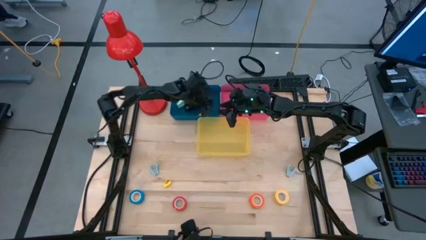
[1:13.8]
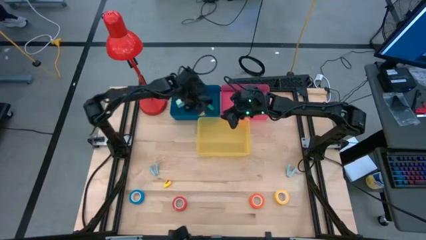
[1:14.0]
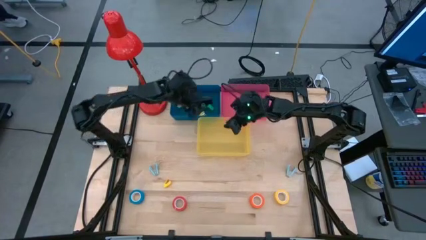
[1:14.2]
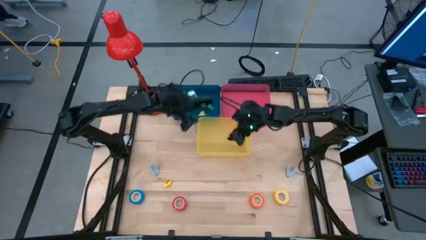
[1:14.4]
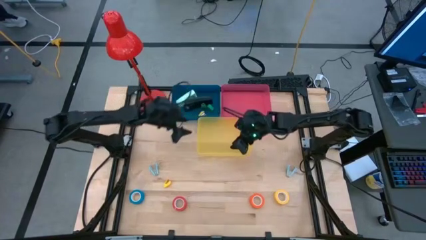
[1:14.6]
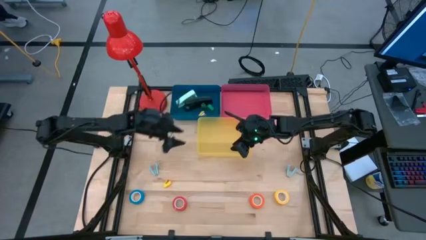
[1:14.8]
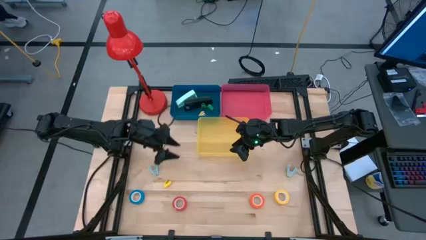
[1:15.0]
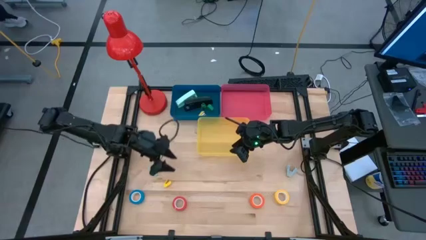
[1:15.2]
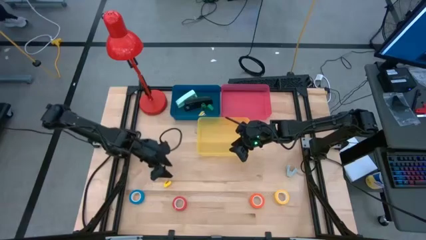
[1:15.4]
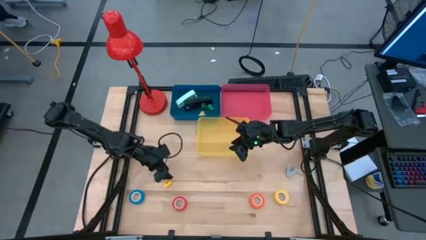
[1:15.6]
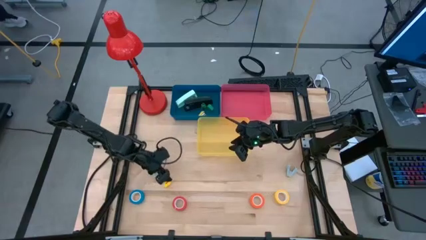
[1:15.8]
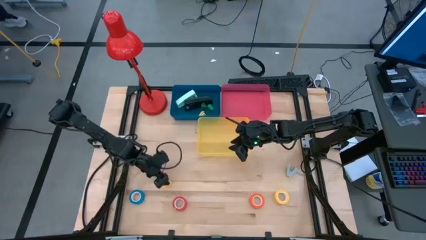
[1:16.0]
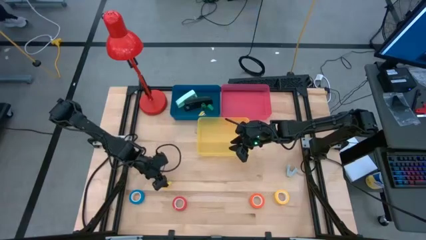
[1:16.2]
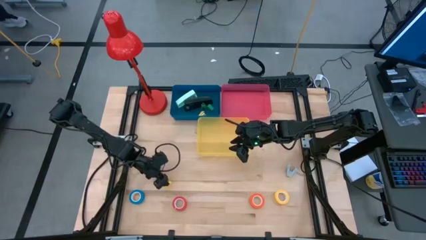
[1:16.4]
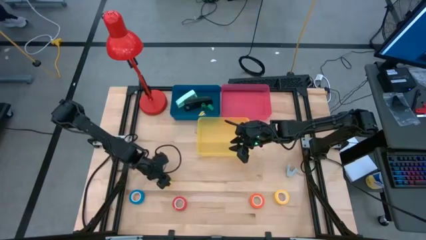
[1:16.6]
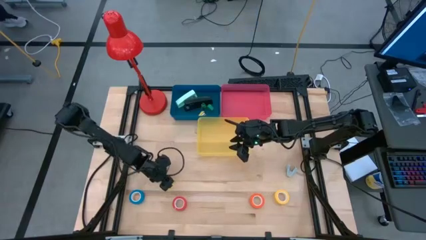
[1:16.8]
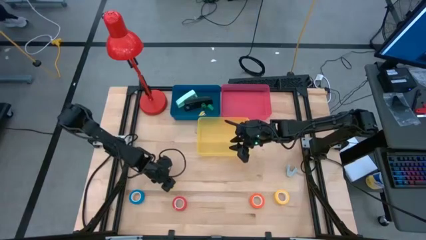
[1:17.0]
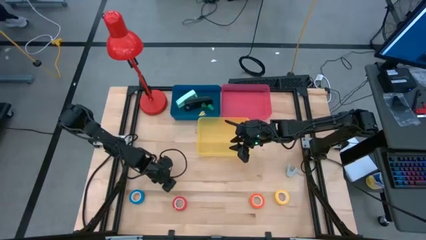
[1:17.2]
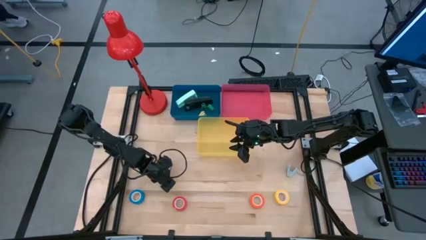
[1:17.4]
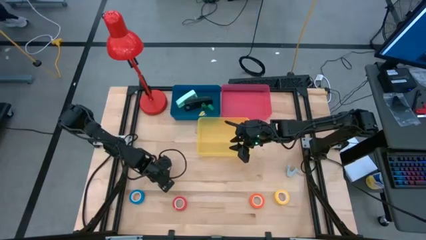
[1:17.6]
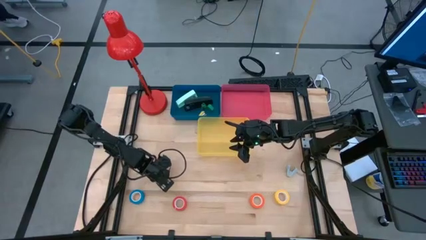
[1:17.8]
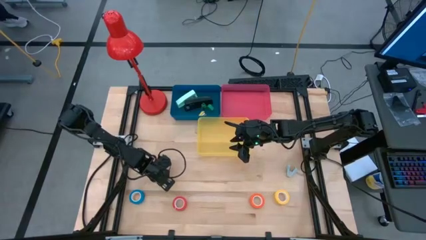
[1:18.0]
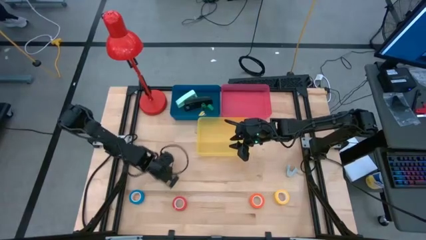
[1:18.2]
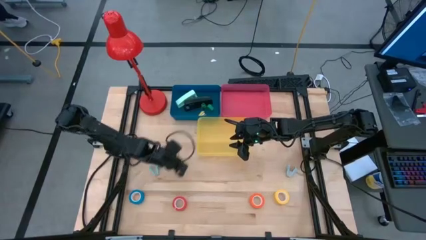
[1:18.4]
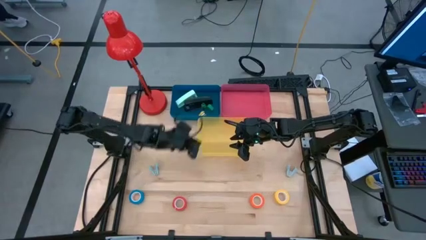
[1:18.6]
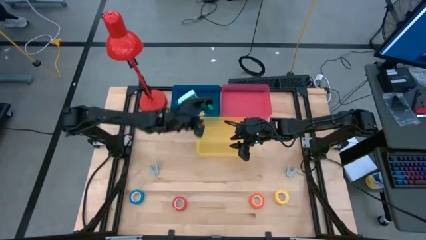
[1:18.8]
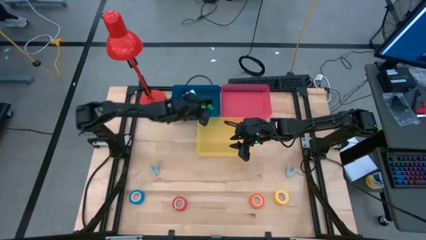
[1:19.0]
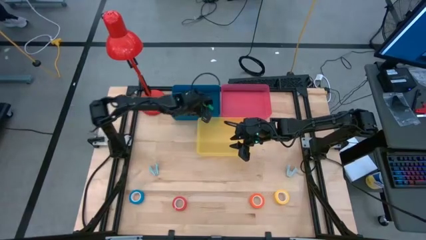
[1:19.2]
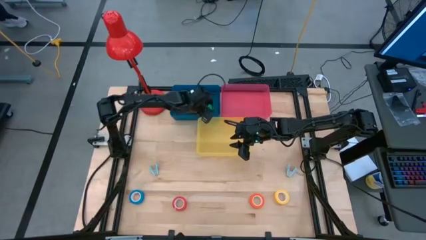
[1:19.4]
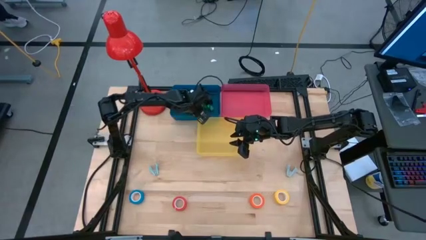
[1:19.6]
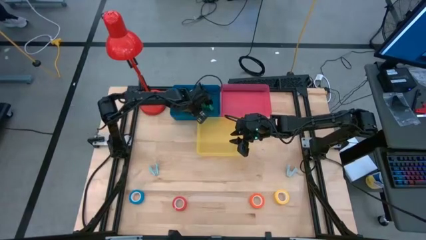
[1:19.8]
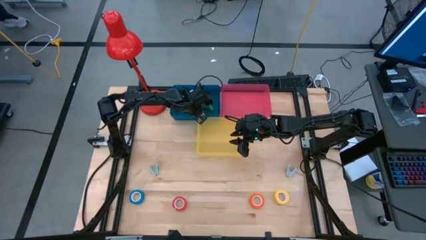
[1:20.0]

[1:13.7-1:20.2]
Task: Pick and place Stapler, Stapler remover, tape
Put the yellow stapler into the blue bin

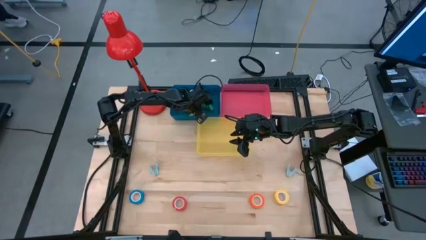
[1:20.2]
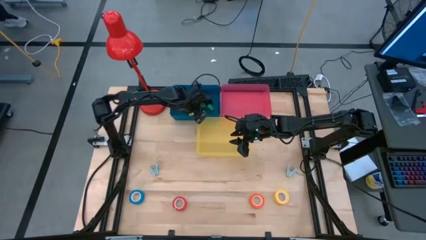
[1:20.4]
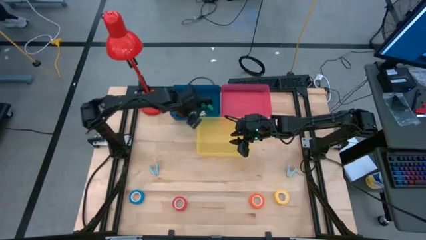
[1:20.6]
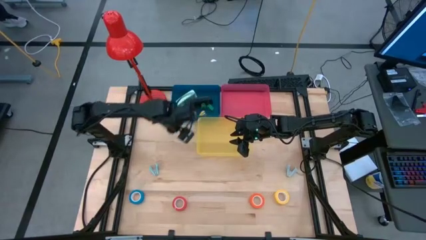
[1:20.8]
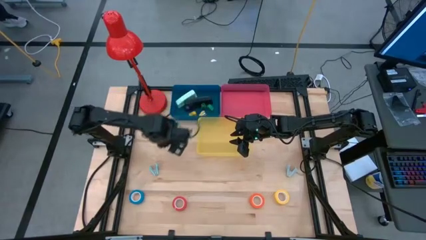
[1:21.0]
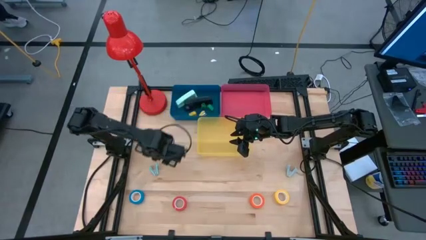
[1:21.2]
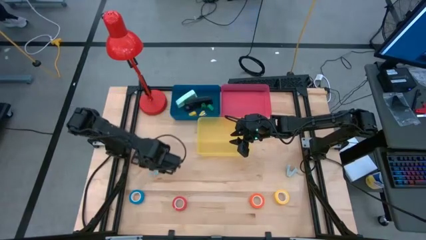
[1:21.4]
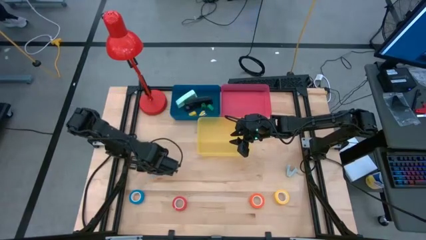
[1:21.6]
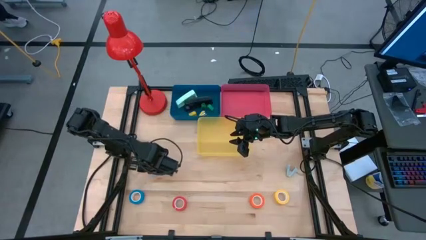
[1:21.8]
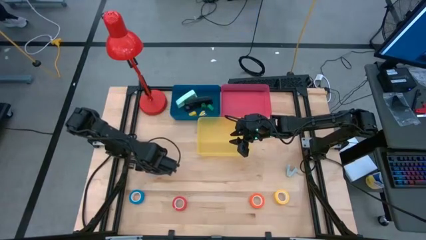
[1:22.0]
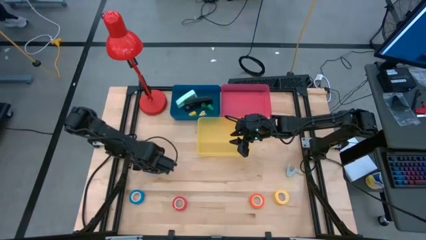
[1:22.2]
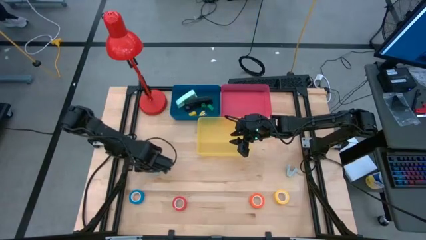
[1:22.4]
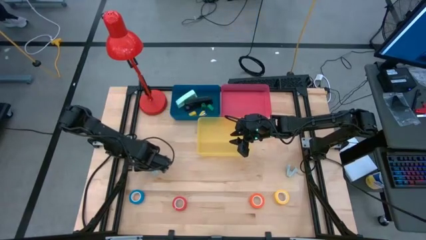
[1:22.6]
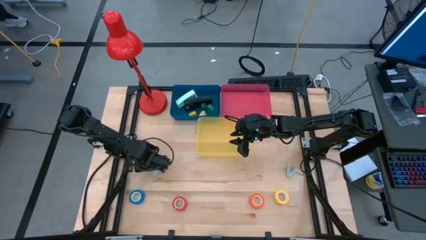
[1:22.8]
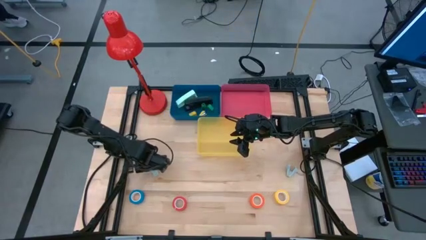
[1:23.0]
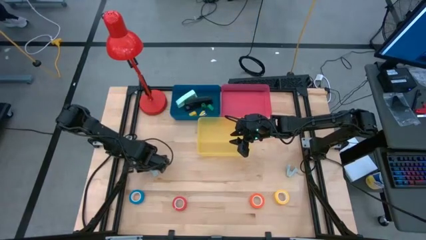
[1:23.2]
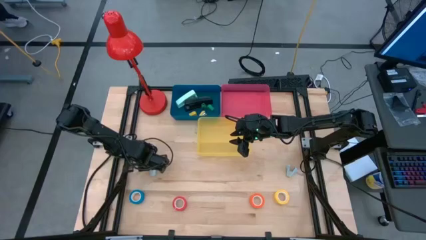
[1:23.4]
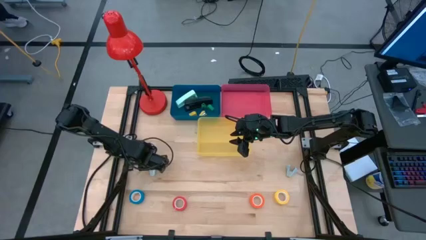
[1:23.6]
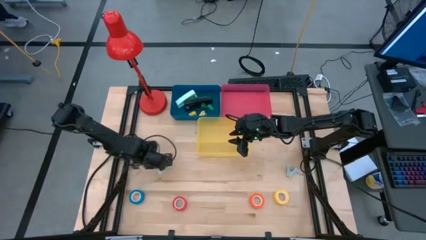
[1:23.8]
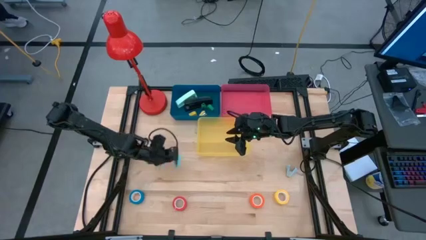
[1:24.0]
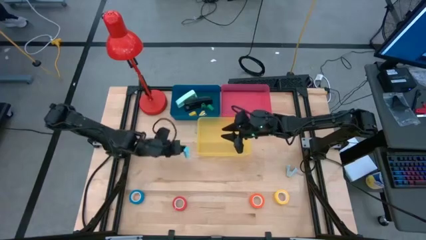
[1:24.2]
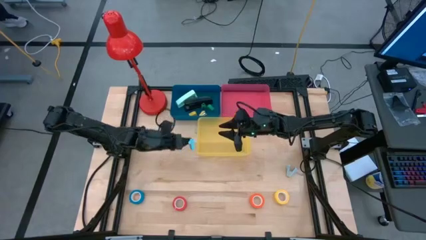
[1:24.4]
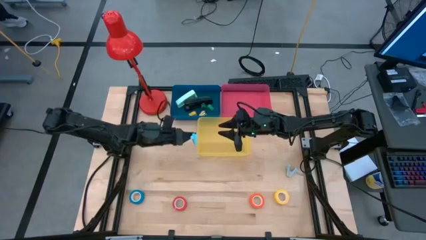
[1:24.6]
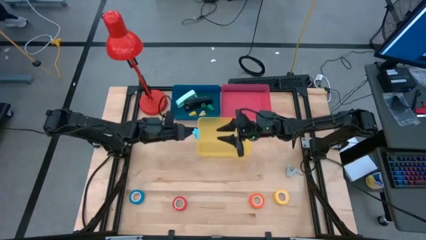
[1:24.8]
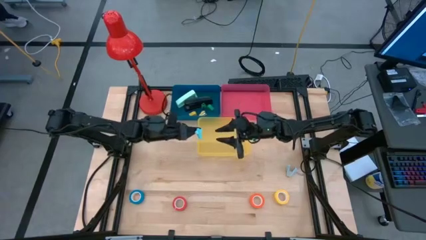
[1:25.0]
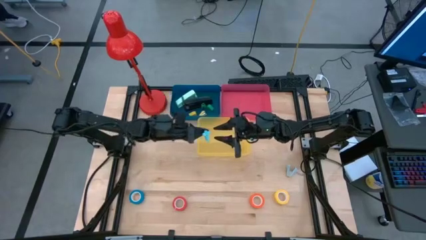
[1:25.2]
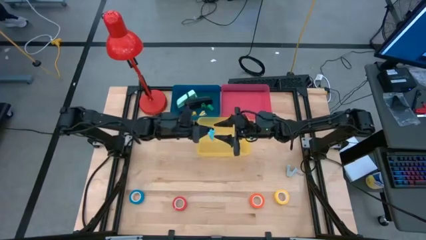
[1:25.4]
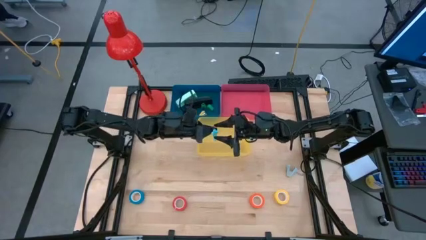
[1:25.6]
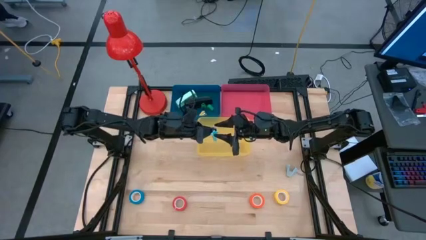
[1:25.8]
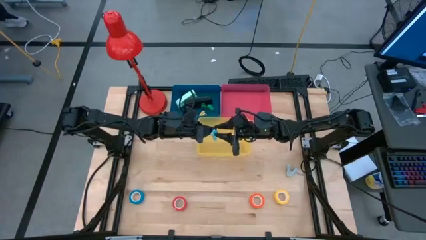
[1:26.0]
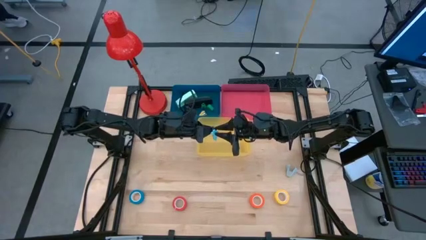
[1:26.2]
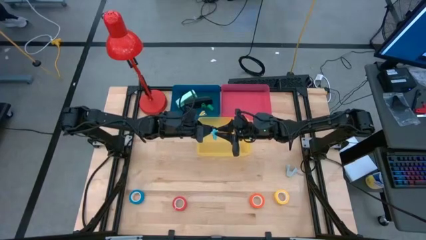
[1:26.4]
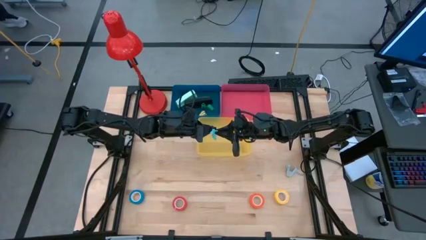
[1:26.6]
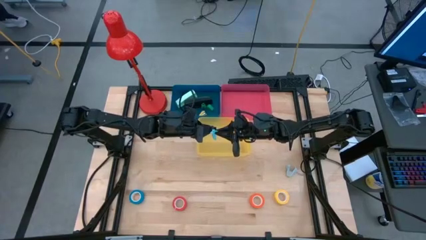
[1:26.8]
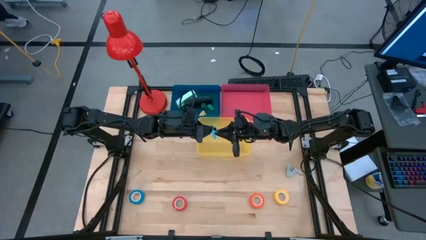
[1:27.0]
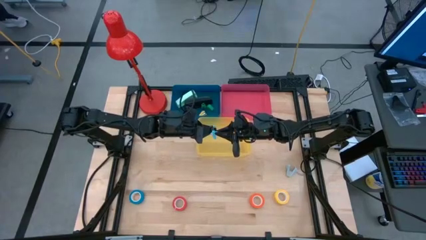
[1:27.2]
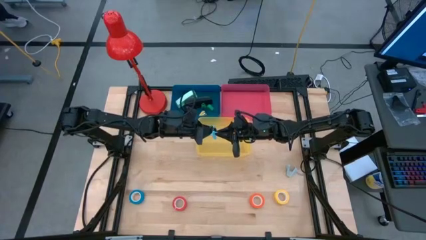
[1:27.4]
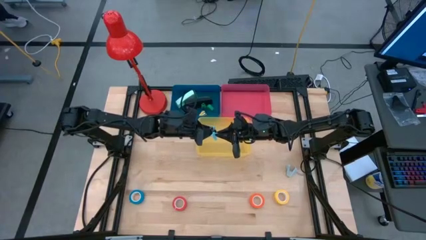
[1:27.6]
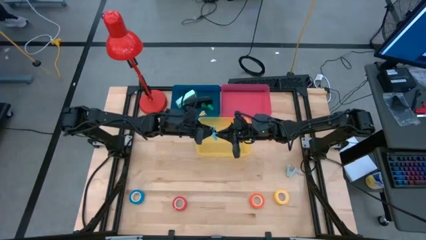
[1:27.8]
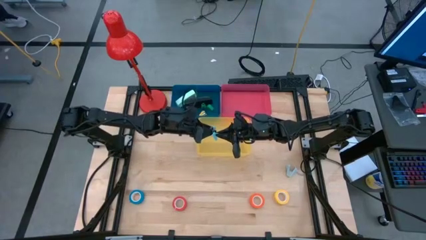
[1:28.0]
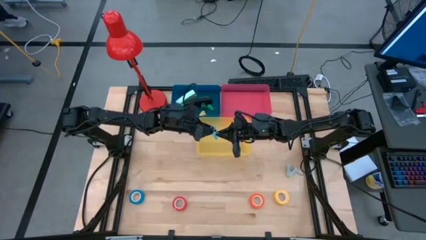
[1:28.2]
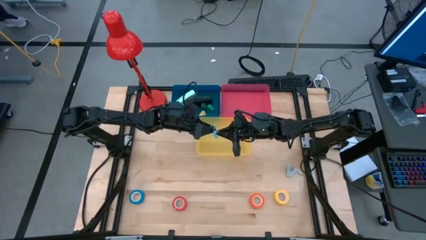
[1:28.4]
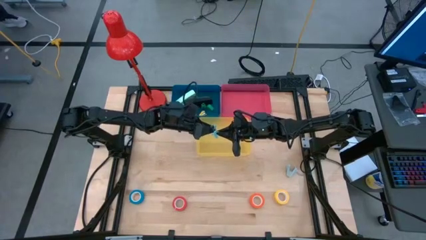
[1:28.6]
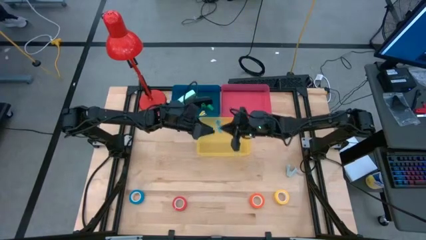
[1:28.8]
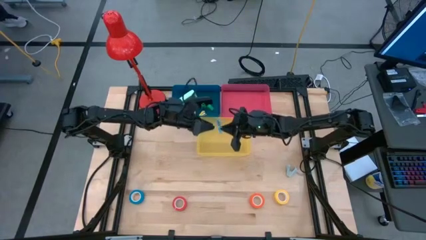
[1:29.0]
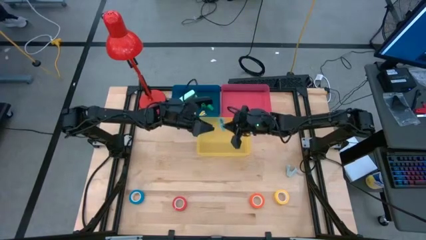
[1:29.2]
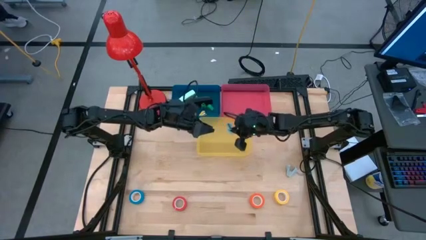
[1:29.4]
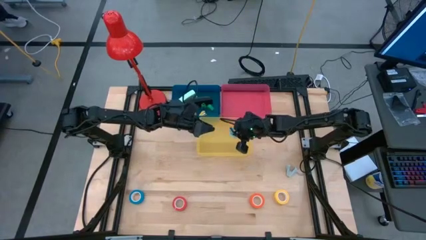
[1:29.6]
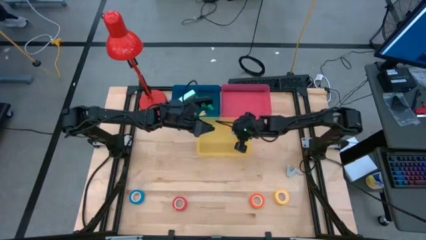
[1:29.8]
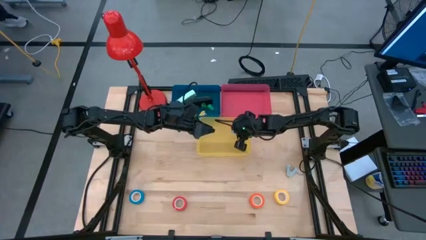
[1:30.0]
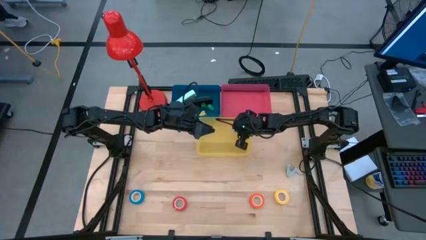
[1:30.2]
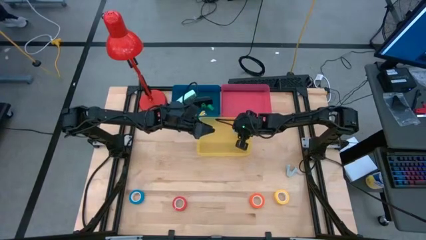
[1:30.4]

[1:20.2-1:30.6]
Put the light blue staple remover into the yellow bin
